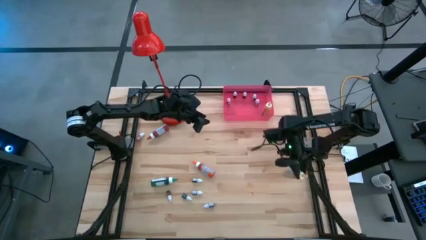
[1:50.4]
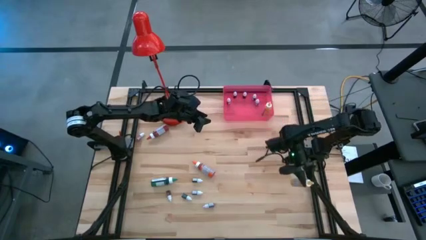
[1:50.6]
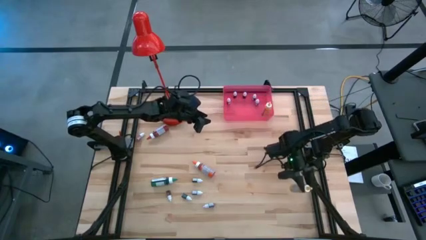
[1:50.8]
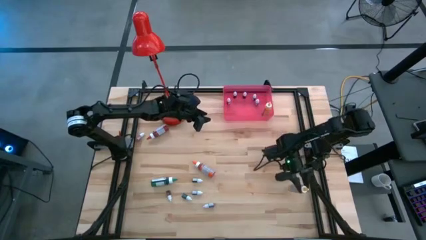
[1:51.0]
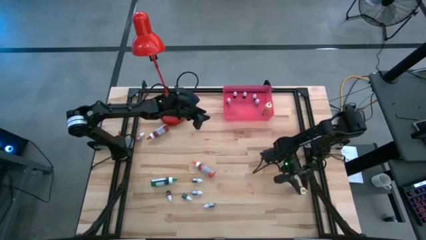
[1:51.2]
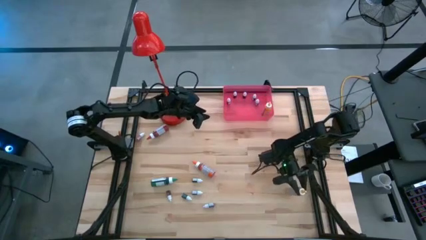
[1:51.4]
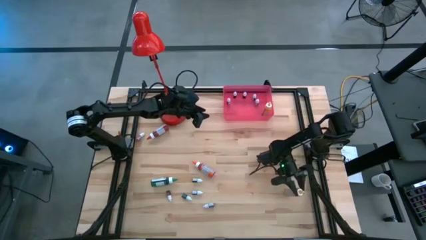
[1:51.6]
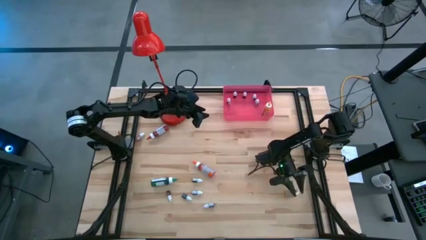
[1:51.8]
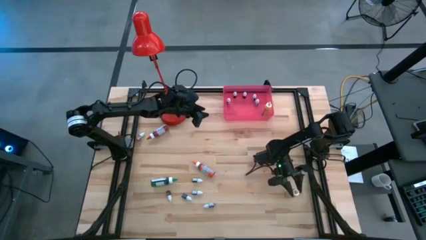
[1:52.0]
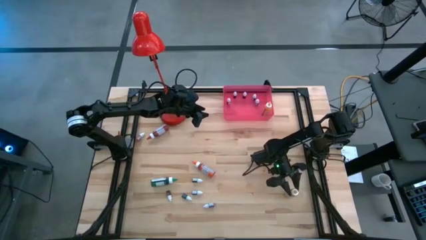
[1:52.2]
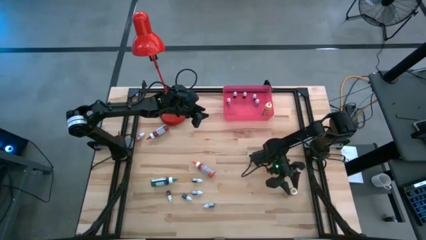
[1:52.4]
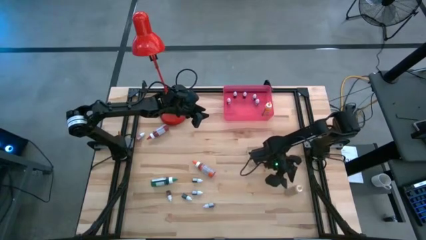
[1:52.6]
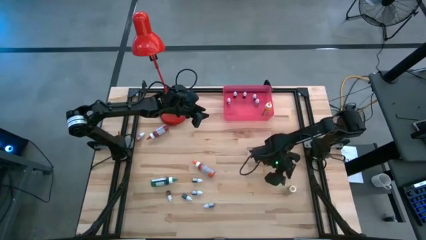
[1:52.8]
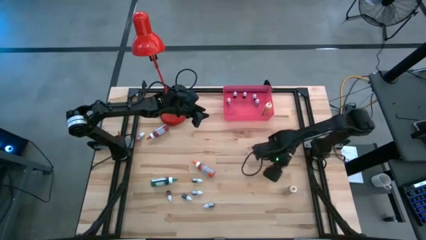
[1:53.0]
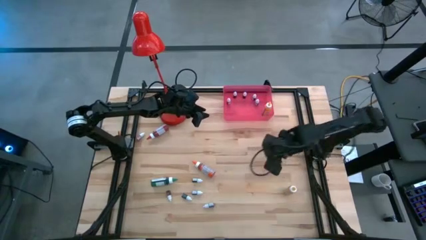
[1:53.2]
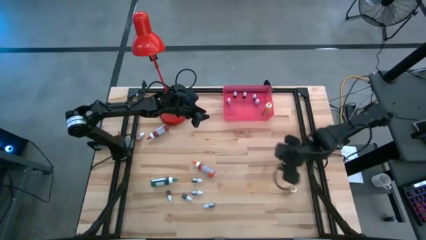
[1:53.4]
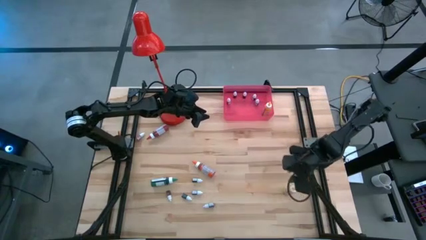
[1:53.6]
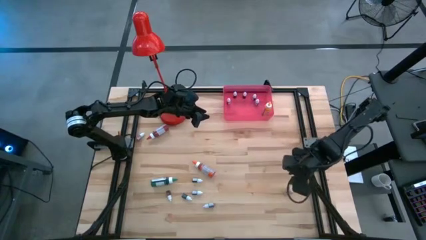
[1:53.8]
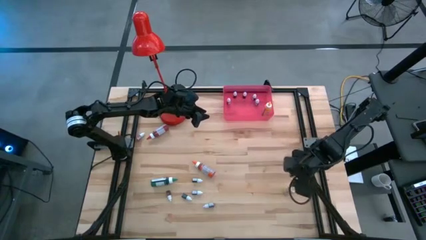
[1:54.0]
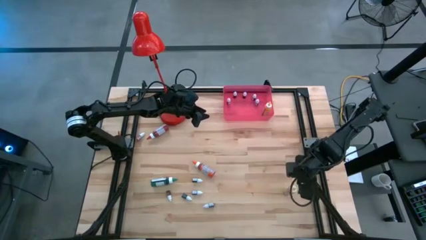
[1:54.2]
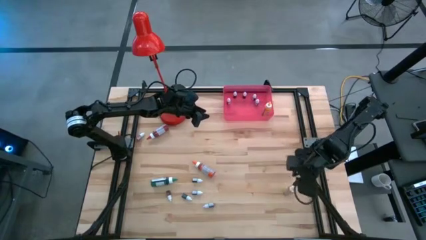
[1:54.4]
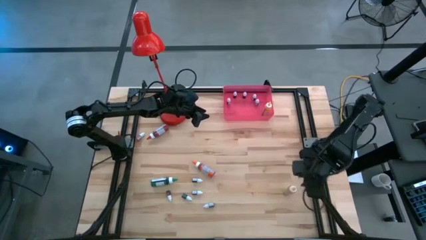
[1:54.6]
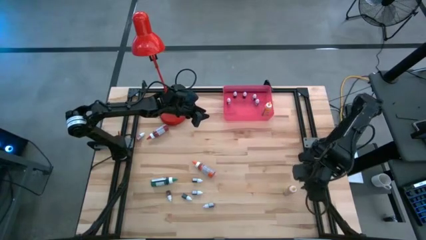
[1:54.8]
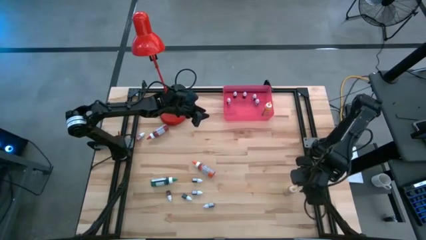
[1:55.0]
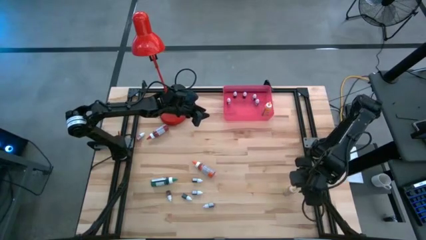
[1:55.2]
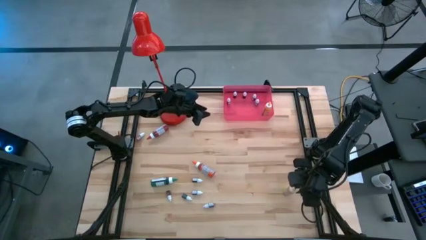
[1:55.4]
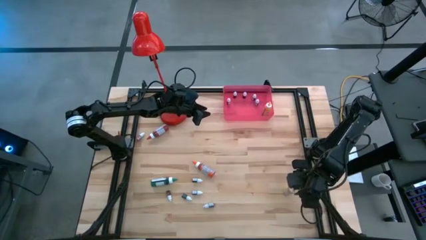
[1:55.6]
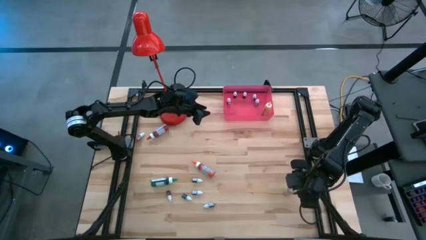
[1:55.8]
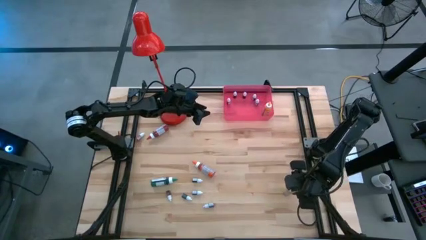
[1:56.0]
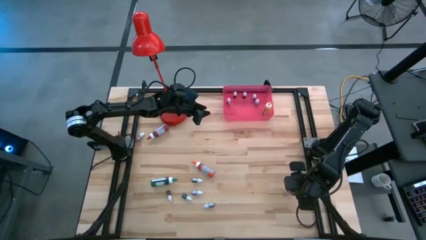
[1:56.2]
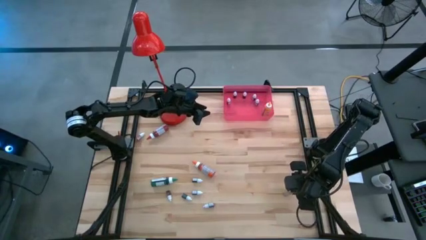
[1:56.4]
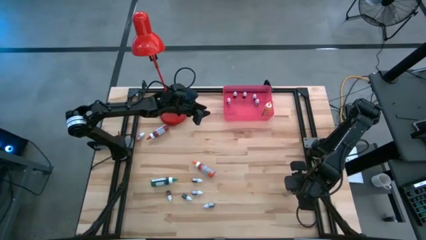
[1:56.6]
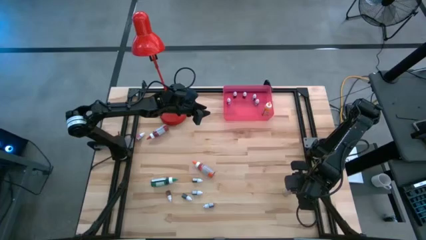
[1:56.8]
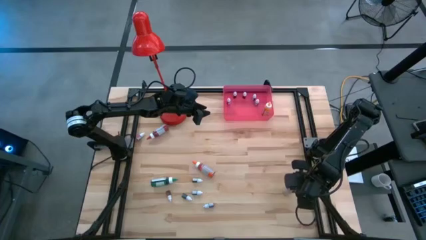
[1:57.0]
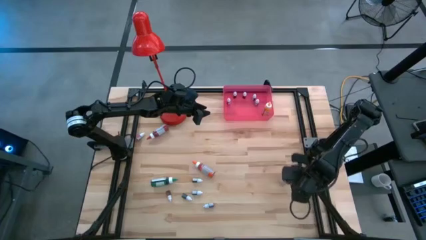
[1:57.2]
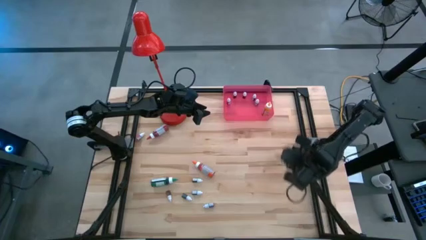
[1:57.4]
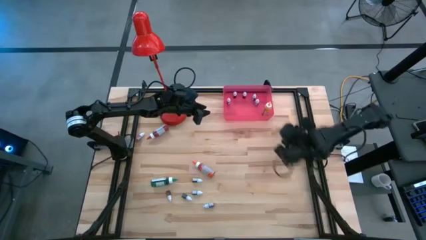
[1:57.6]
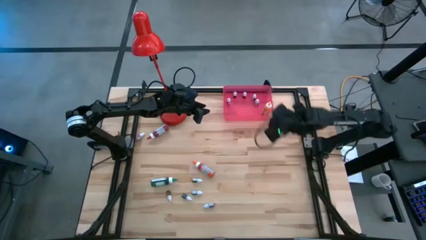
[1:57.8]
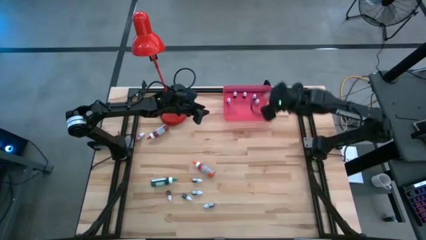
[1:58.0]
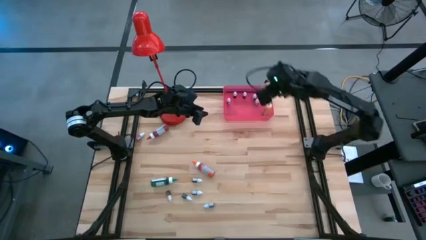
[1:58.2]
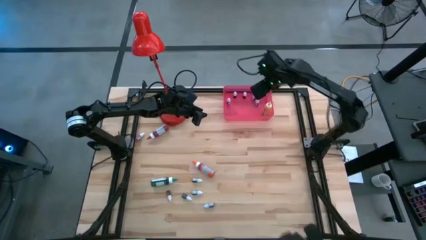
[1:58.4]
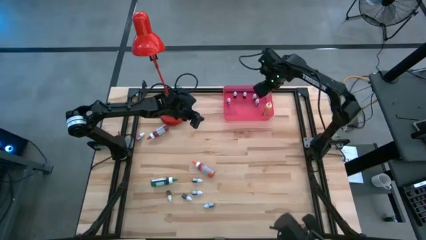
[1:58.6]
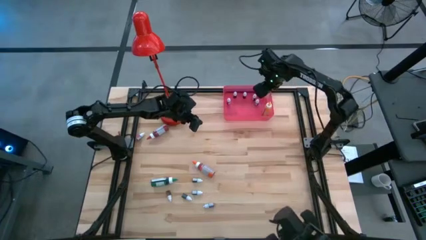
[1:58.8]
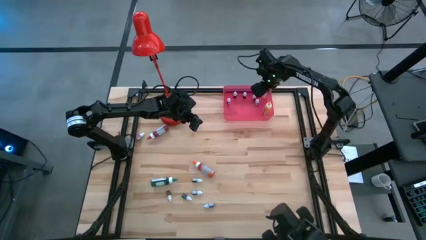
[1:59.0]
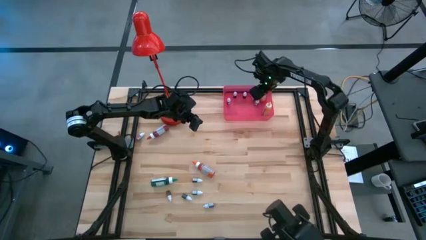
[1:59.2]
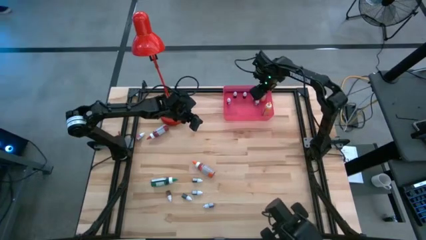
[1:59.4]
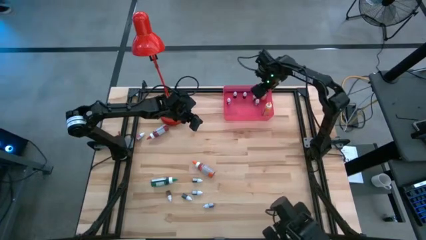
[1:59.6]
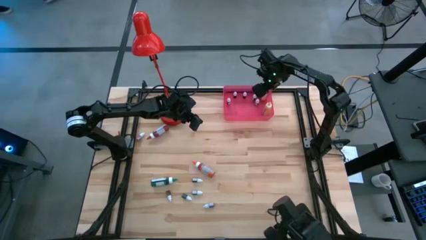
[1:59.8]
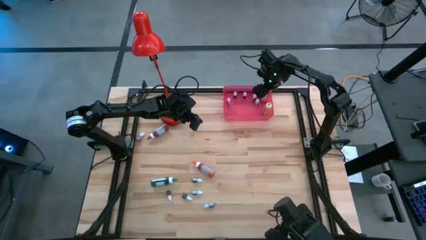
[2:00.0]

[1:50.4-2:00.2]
Task: Pick & Place food coloring
Put the large yellow food coloring bottle into the red bin

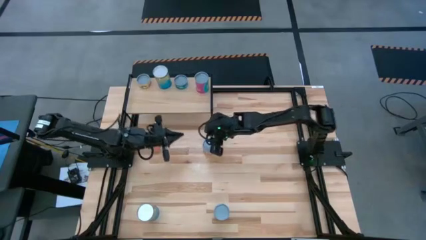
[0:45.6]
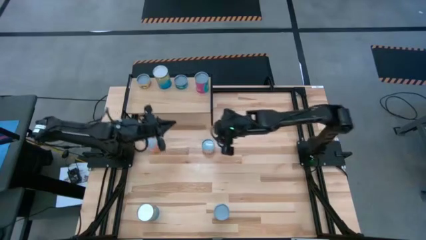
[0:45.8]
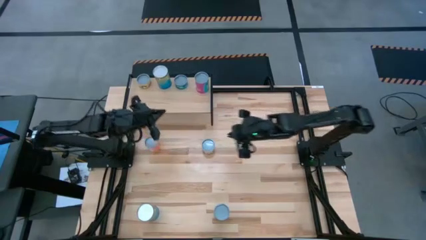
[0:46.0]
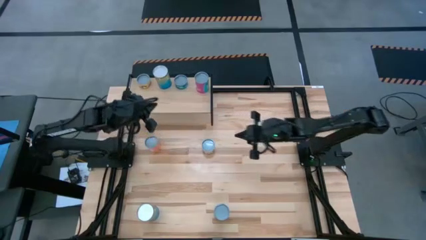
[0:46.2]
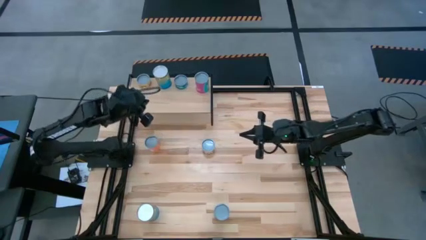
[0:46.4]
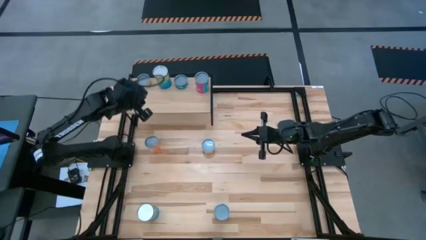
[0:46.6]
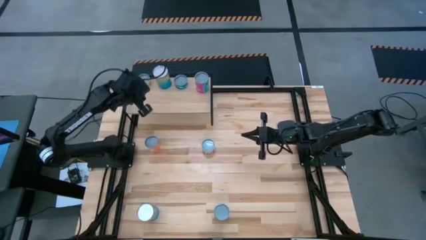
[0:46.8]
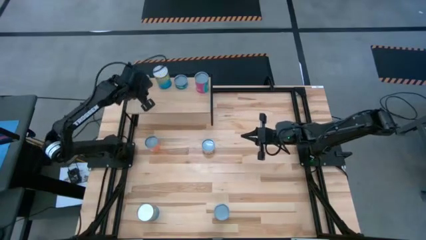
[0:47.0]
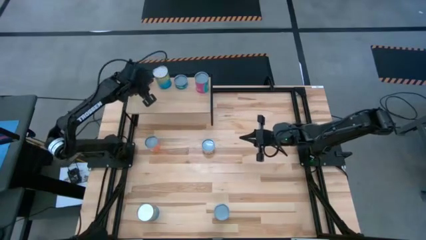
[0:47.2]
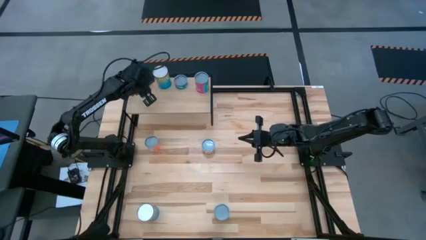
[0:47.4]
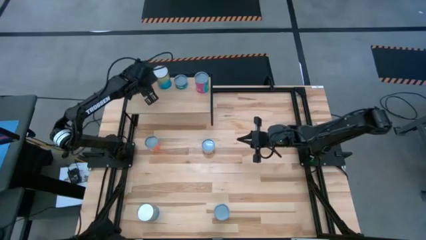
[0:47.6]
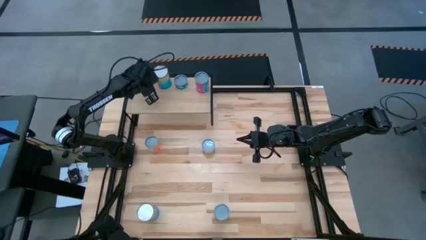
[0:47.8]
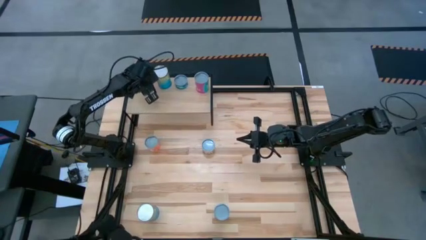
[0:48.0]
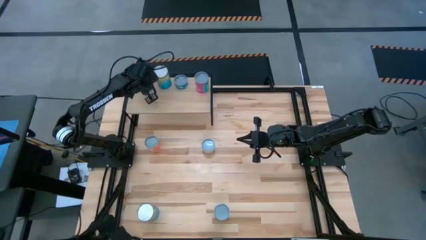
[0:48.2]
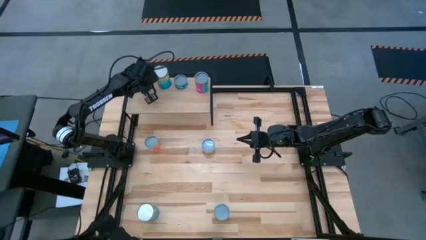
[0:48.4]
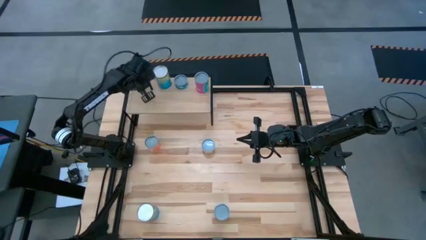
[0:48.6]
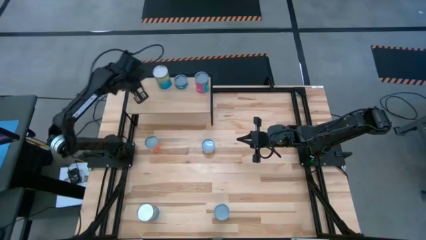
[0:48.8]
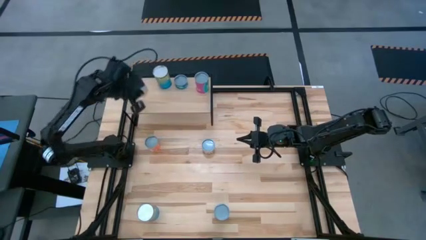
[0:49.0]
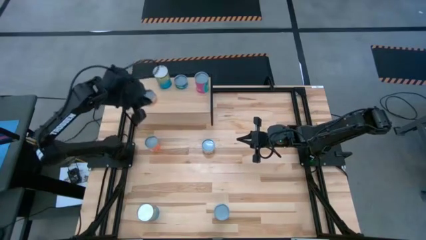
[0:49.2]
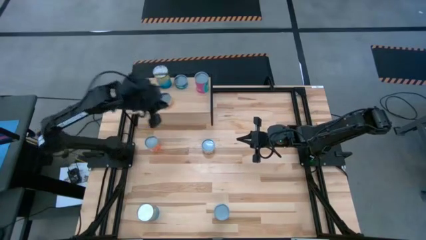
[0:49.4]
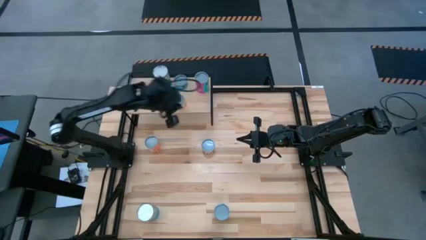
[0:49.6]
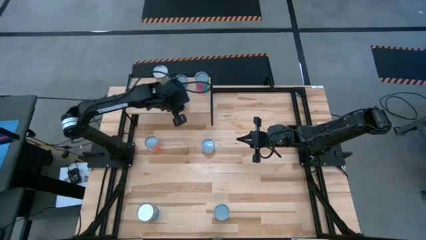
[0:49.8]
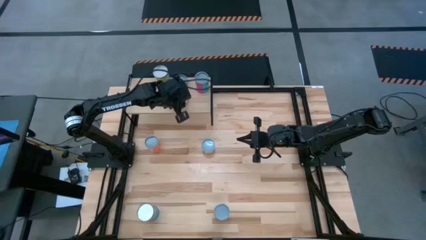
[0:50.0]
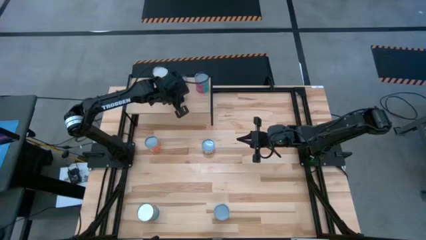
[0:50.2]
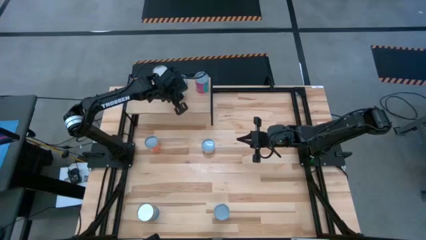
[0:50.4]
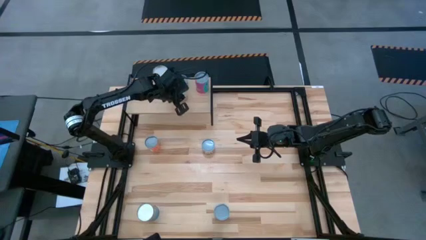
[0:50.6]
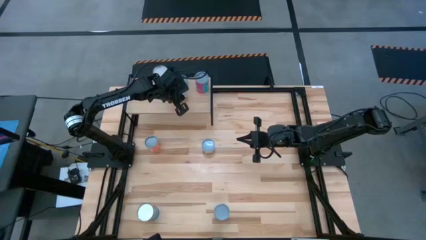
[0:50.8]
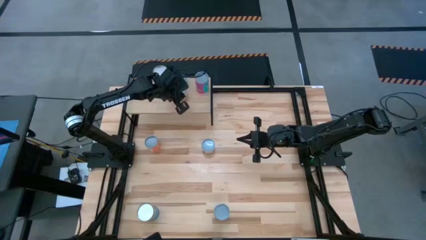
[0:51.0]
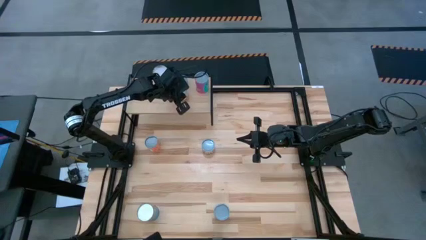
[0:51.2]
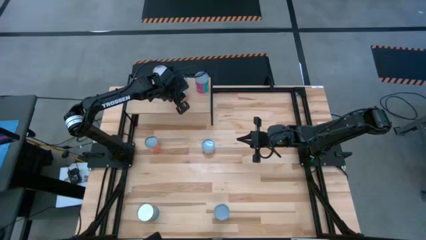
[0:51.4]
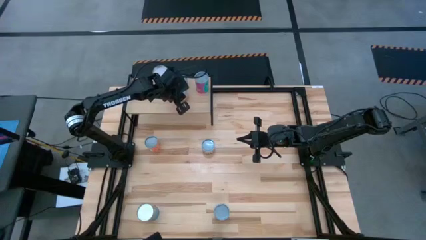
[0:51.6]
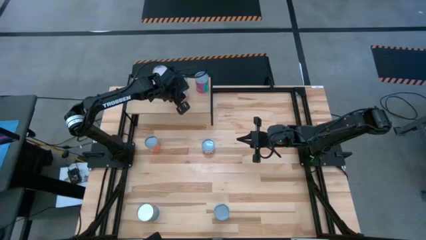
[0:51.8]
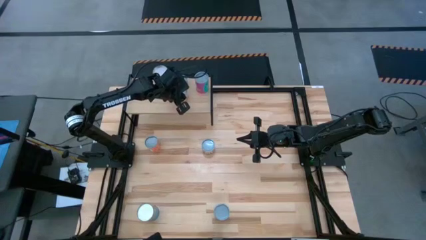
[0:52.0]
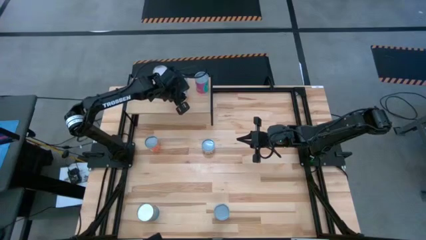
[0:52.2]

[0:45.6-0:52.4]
Task: Pick and place cans onto a shelf
Adjust the canned mushrooms on the shelf
